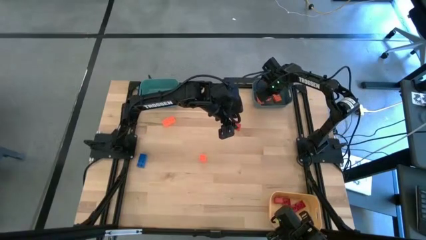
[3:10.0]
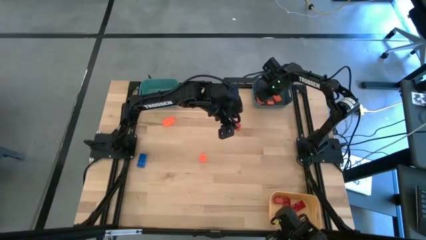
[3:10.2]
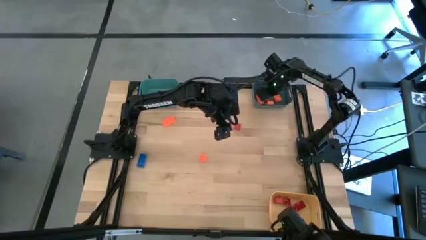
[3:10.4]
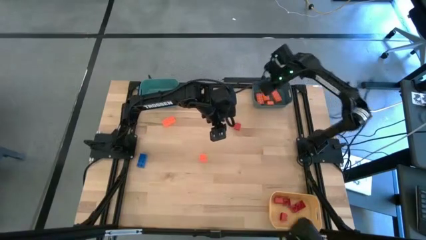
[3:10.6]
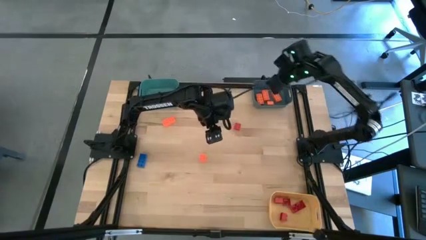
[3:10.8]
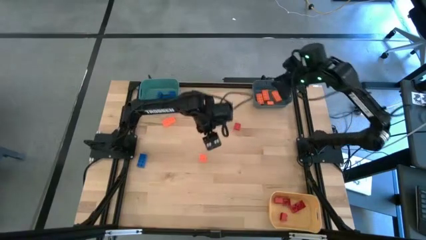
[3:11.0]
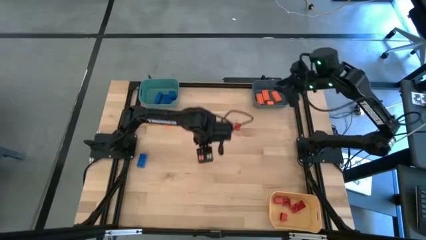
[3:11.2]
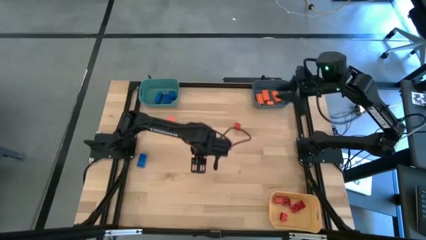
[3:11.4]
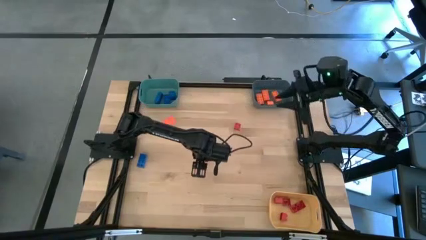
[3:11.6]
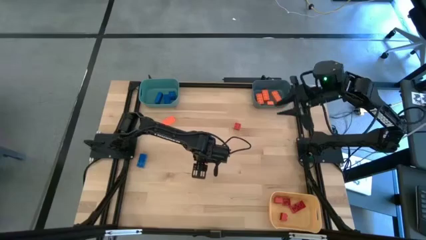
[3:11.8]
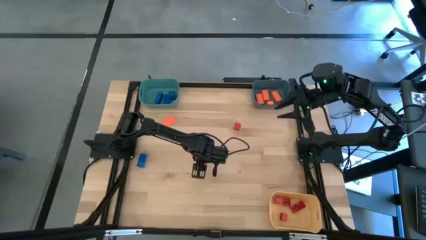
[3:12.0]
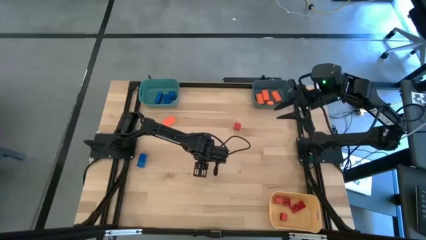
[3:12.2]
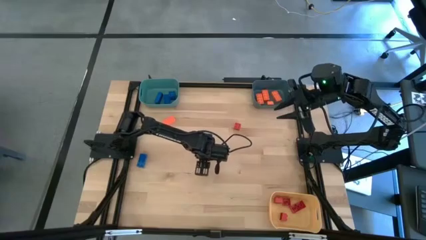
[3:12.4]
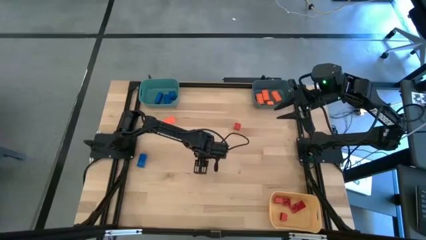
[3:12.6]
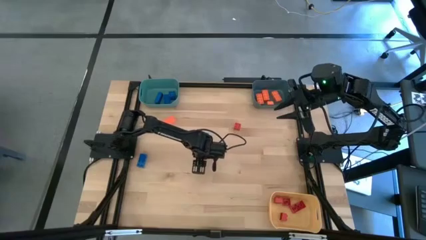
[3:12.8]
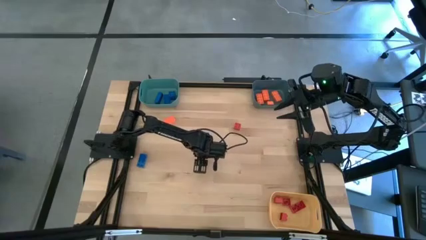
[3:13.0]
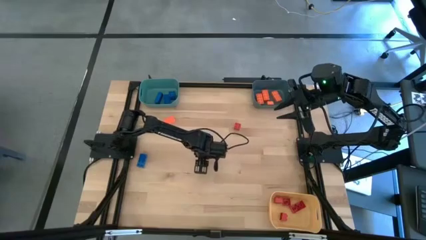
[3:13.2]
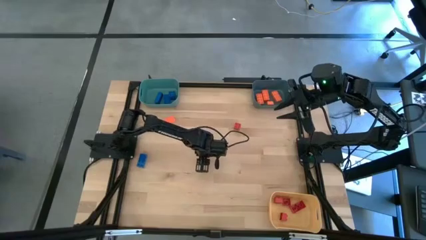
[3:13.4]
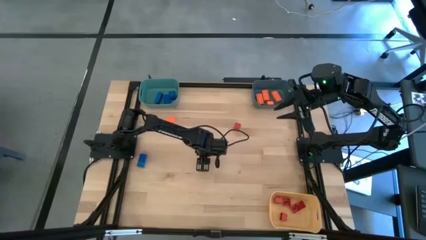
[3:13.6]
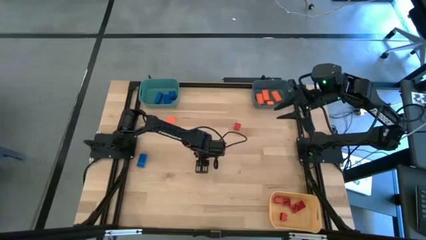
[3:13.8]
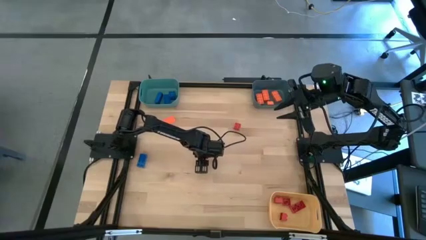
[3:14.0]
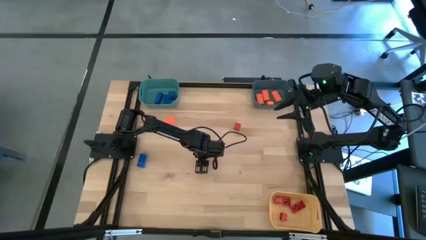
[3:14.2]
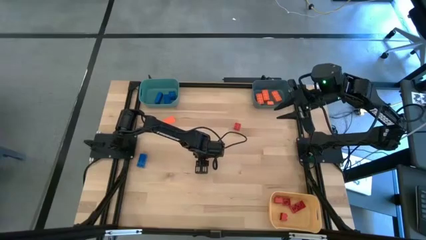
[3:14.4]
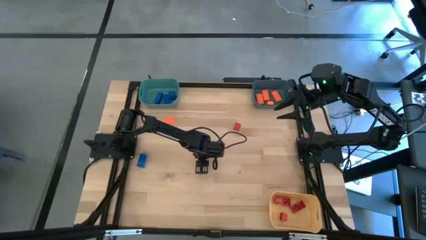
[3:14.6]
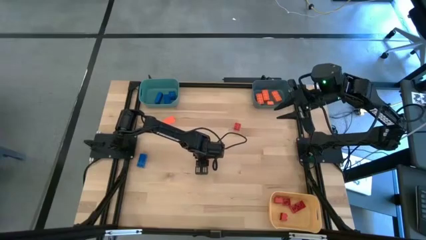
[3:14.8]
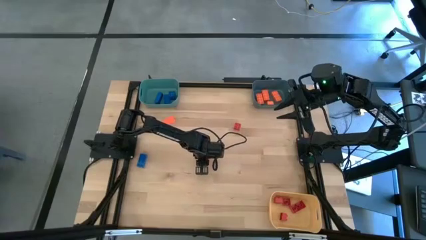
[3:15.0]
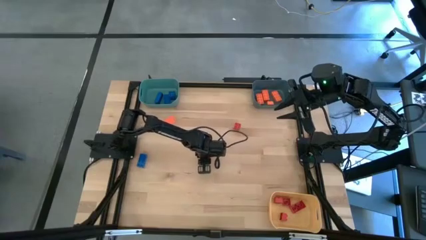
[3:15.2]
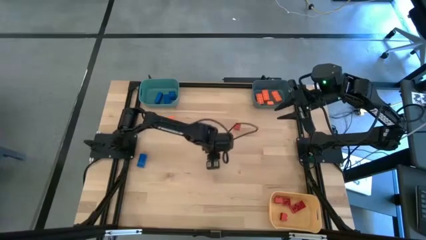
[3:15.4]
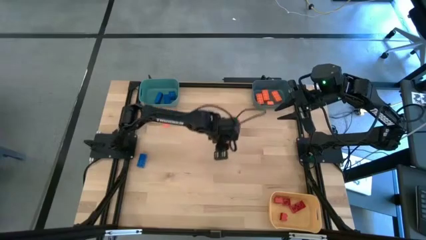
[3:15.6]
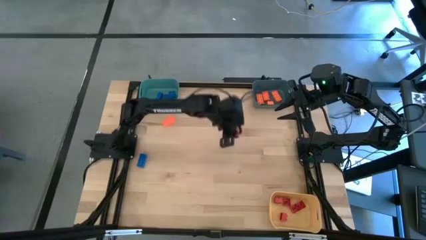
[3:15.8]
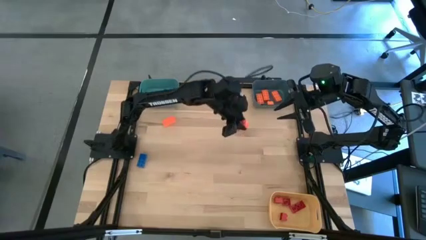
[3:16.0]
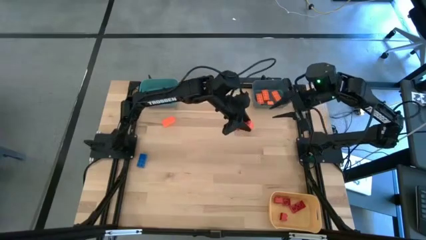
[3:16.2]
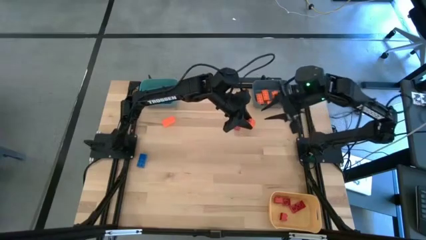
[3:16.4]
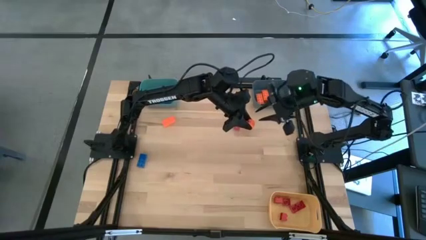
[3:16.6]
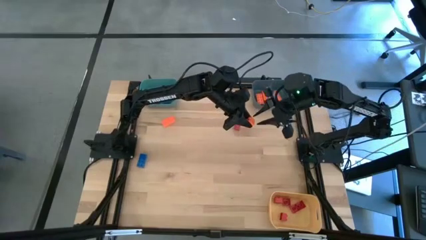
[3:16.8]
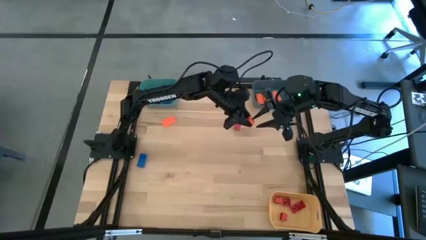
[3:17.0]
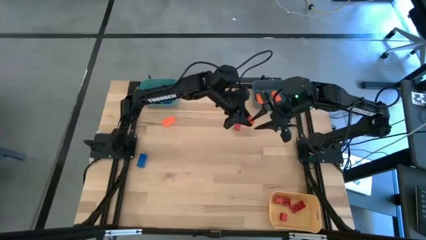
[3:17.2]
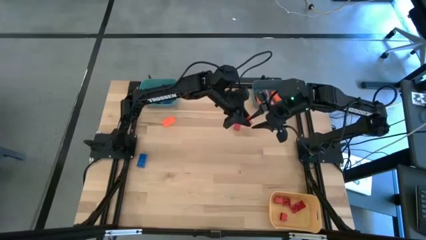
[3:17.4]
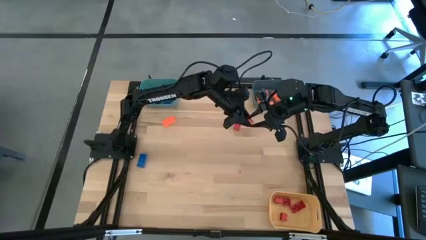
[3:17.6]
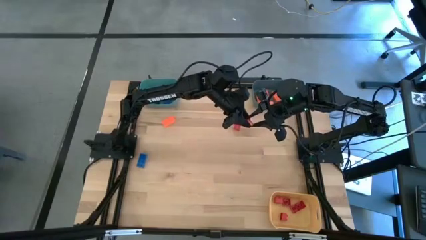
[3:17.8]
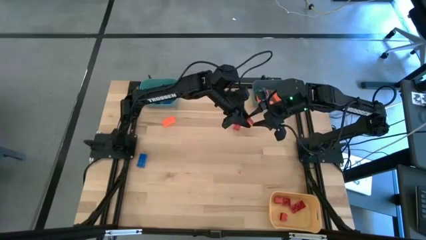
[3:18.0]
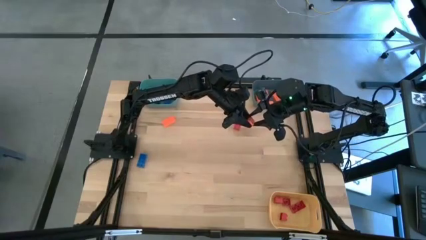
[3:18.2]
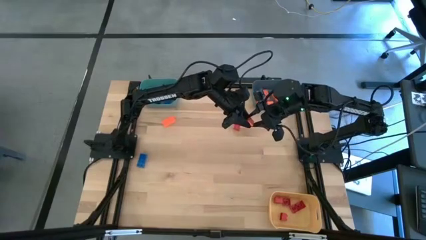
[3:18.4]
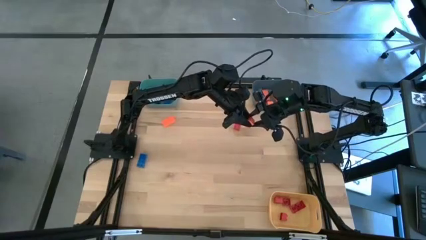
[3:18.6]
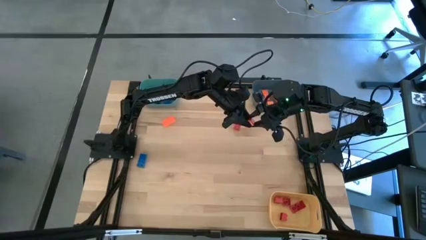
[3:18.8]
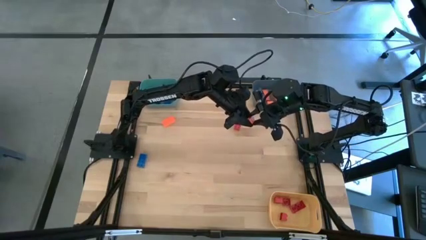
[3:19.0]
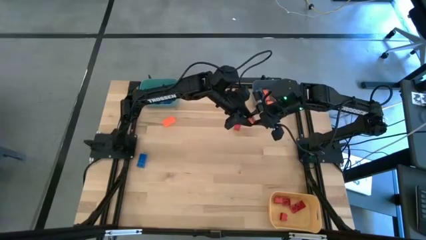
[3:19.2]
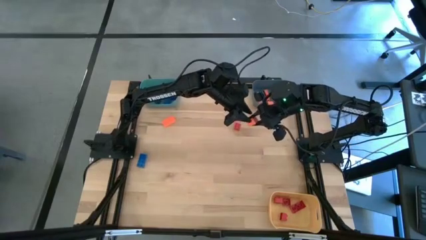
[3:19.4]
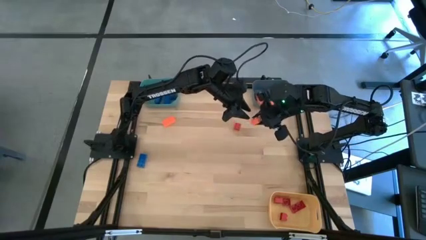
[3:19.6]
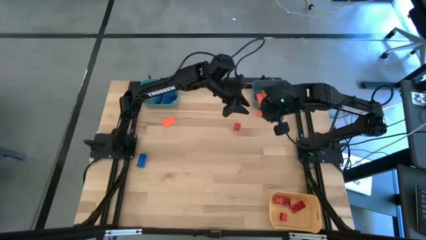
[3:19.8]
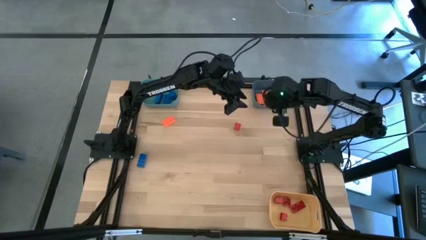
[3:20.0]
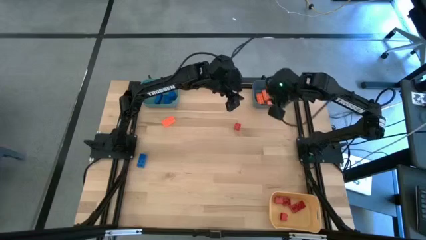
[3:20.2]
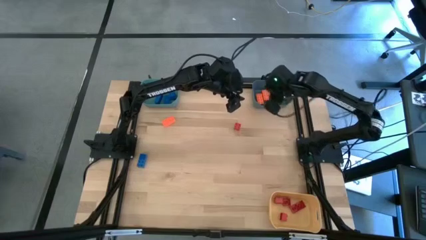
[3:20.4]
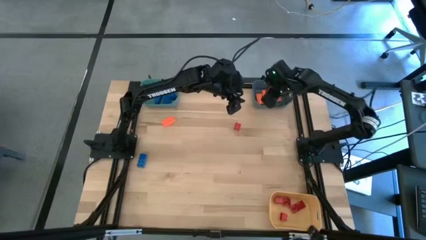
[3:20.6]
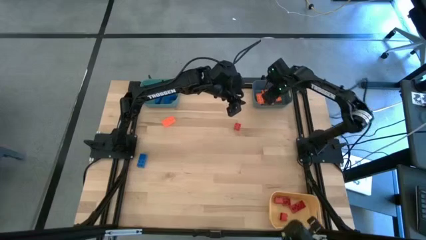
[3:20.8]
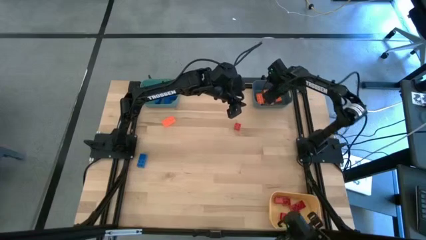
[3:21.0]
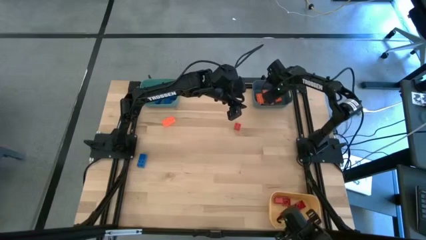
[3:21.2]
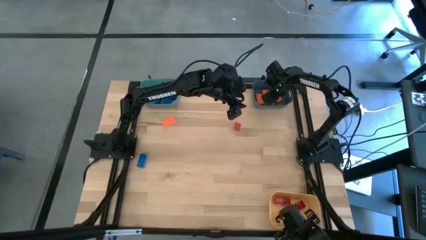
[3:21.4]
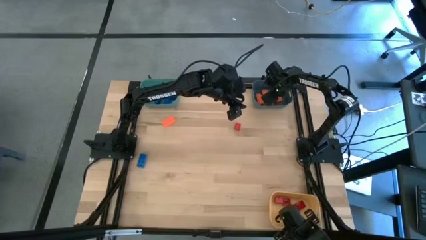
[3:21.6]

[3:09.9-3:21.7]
Task: Sort & place blocks by color
Put the orange game piece into the blue bin
